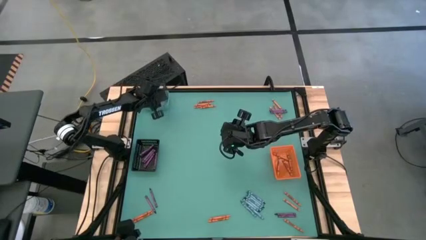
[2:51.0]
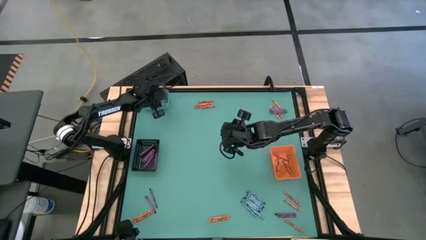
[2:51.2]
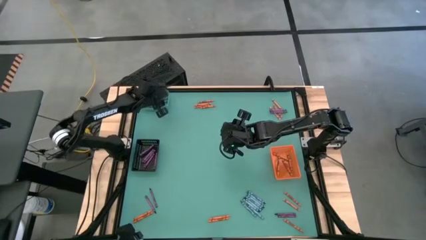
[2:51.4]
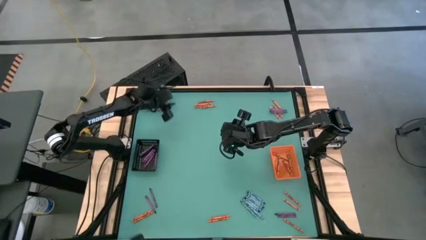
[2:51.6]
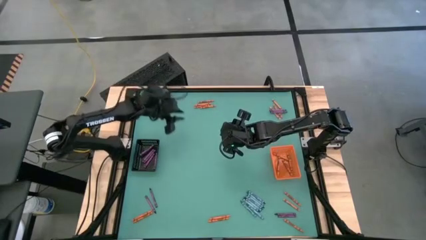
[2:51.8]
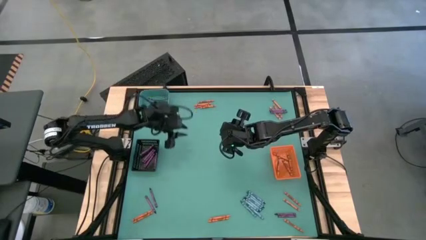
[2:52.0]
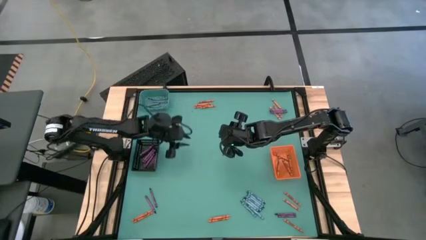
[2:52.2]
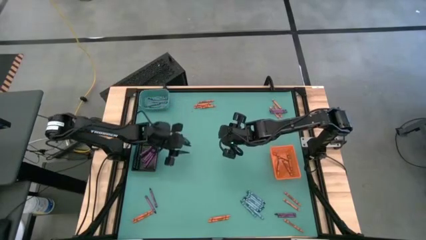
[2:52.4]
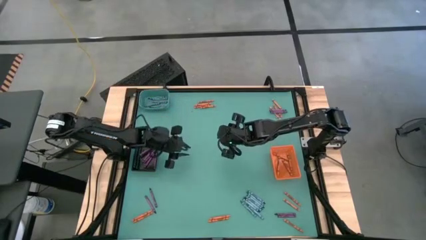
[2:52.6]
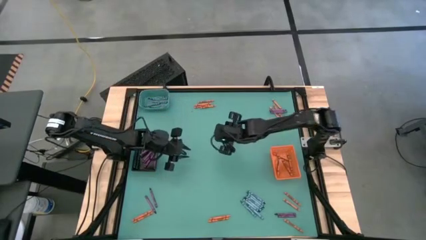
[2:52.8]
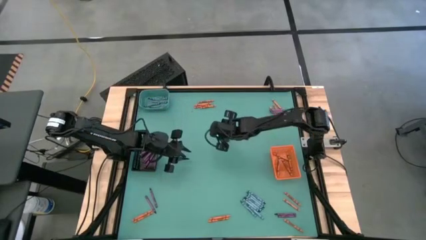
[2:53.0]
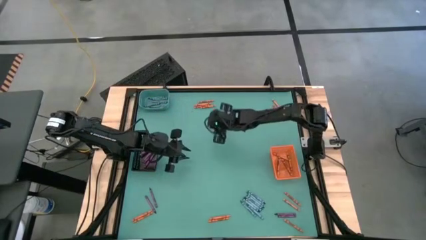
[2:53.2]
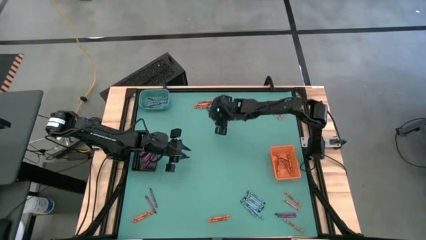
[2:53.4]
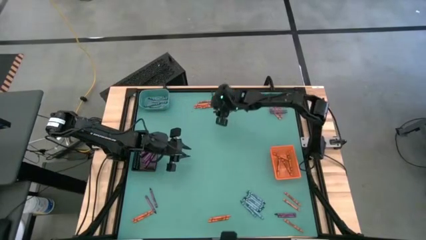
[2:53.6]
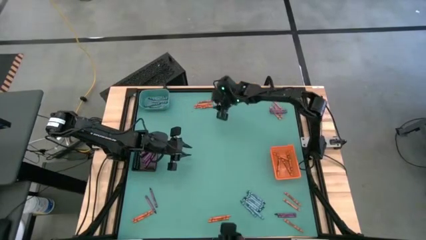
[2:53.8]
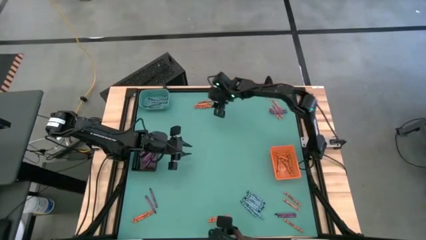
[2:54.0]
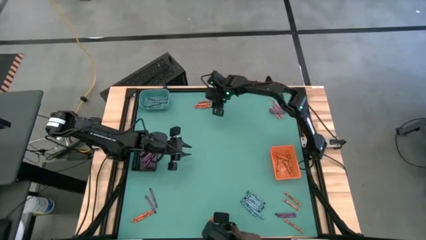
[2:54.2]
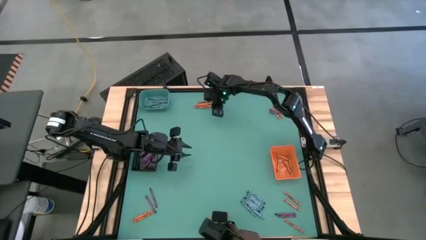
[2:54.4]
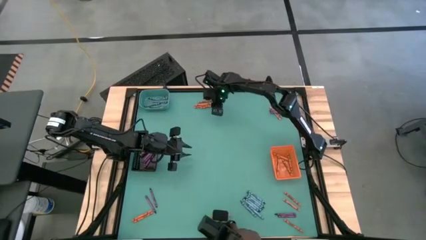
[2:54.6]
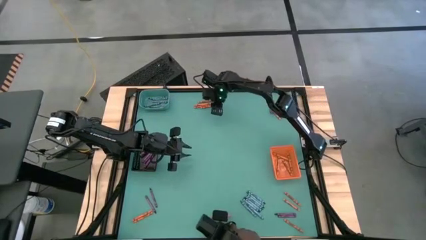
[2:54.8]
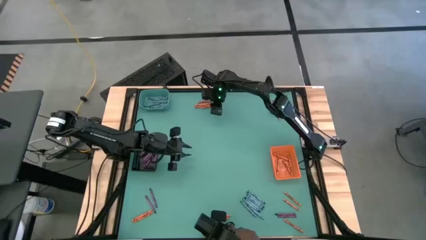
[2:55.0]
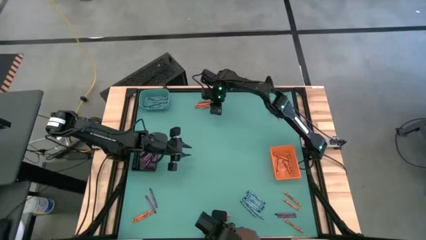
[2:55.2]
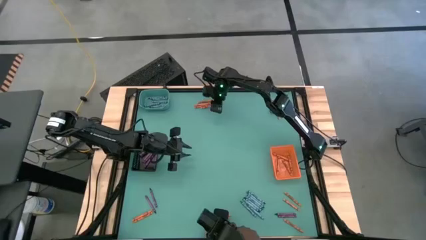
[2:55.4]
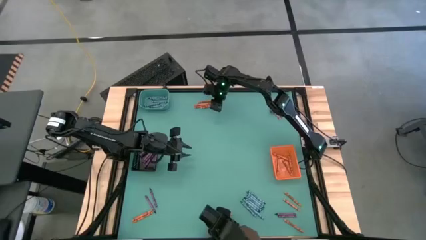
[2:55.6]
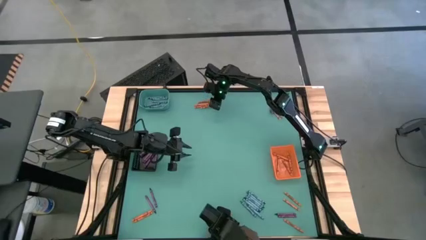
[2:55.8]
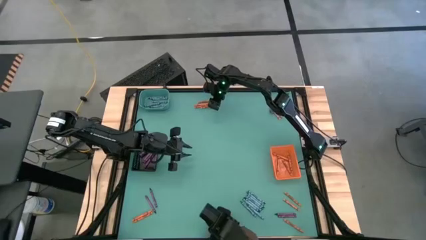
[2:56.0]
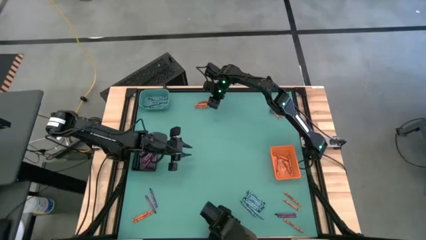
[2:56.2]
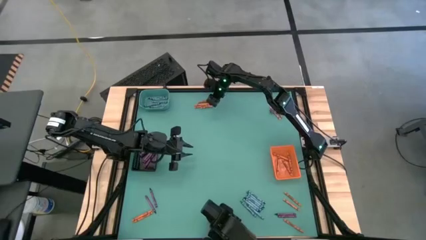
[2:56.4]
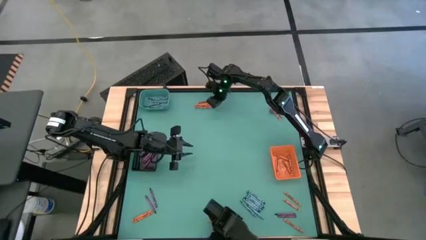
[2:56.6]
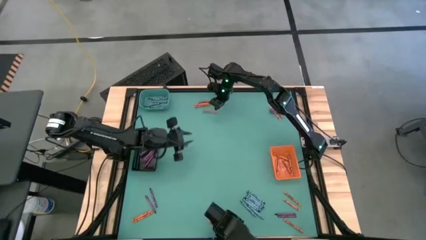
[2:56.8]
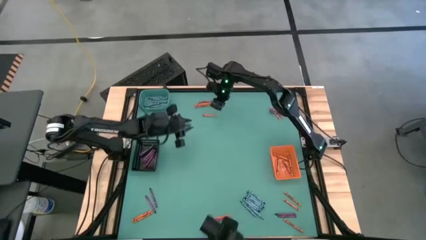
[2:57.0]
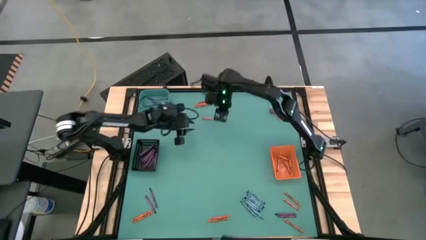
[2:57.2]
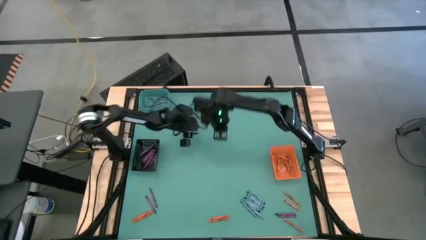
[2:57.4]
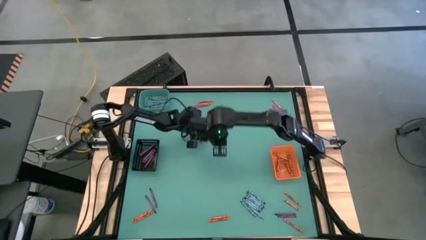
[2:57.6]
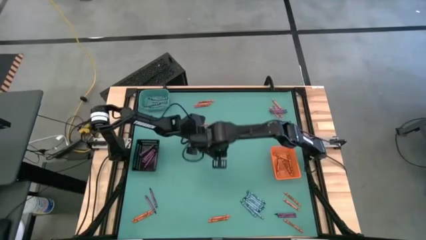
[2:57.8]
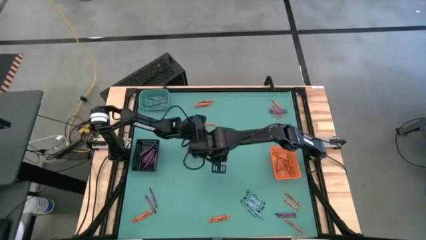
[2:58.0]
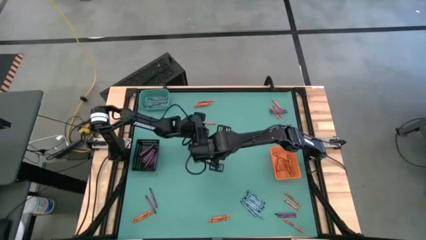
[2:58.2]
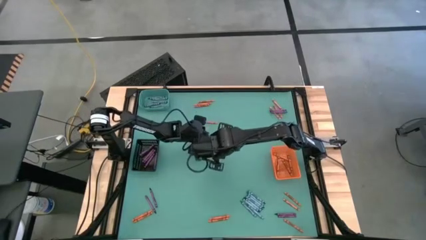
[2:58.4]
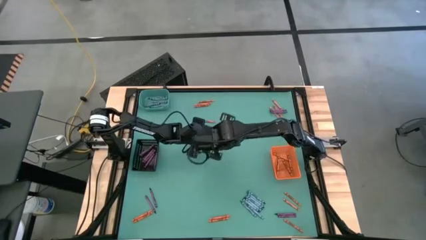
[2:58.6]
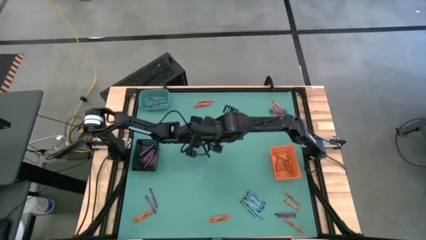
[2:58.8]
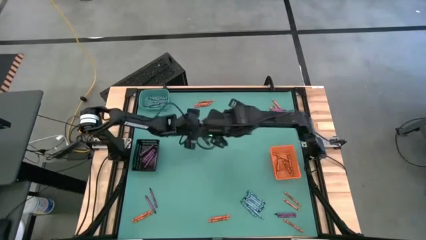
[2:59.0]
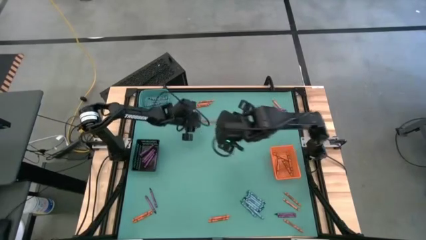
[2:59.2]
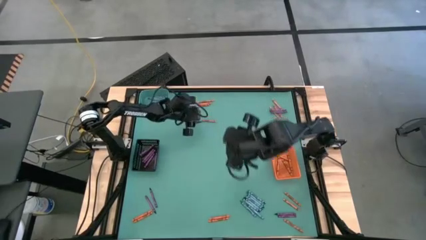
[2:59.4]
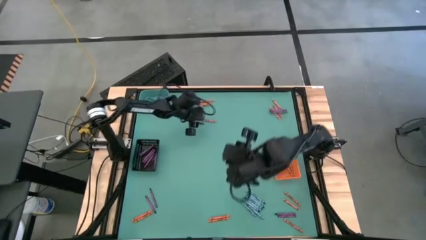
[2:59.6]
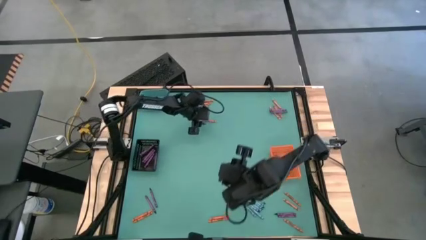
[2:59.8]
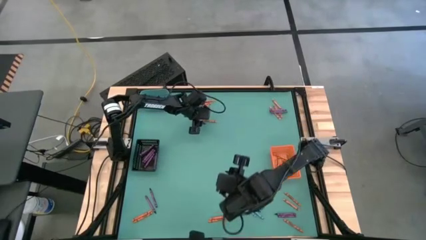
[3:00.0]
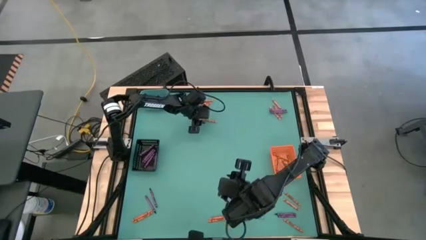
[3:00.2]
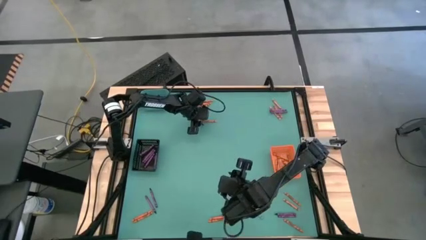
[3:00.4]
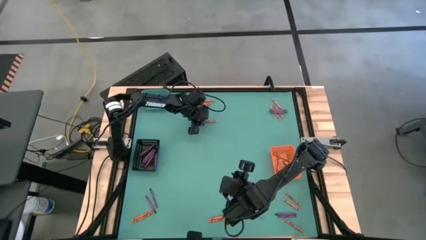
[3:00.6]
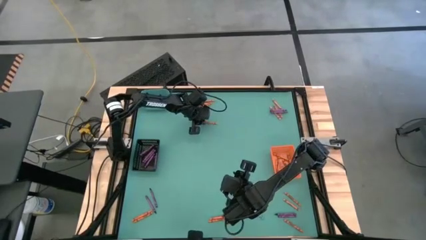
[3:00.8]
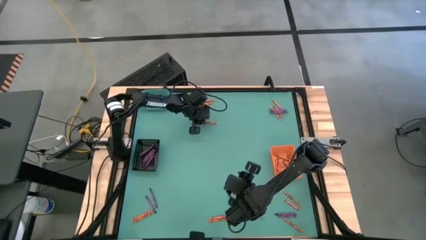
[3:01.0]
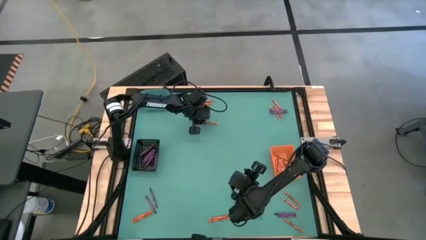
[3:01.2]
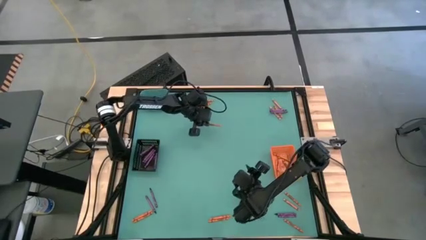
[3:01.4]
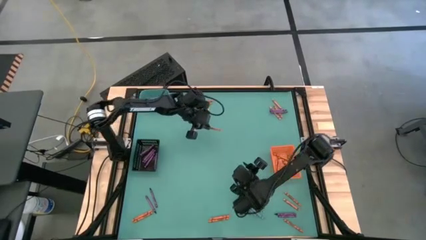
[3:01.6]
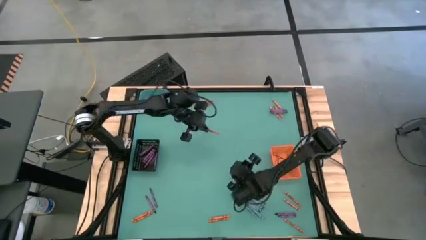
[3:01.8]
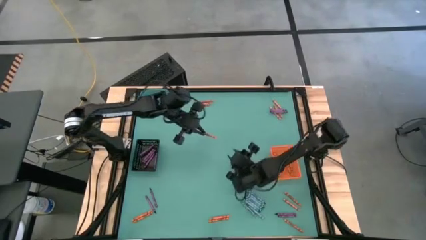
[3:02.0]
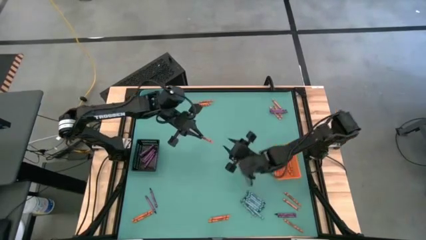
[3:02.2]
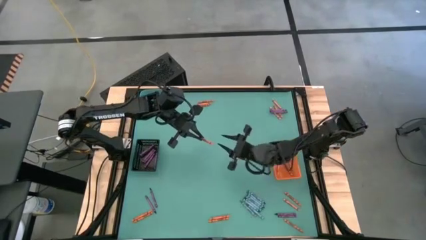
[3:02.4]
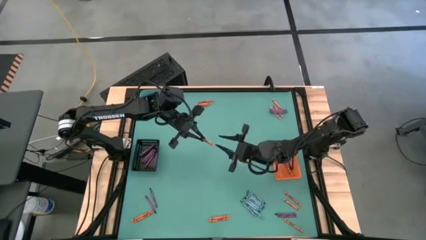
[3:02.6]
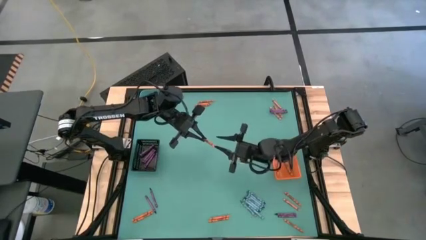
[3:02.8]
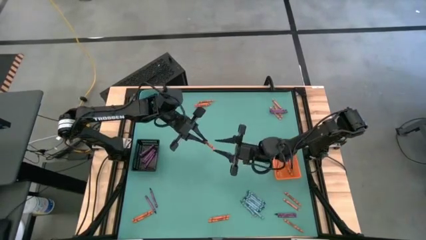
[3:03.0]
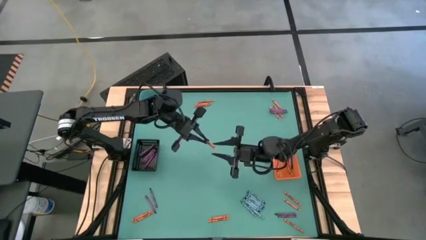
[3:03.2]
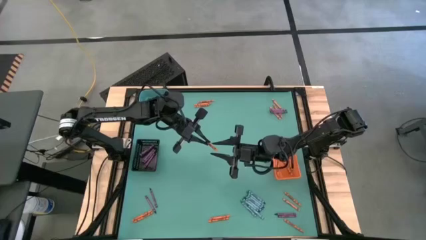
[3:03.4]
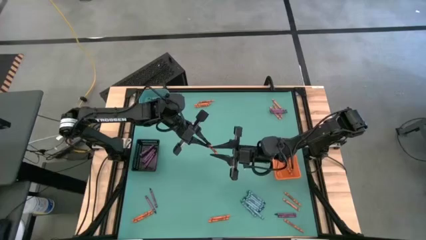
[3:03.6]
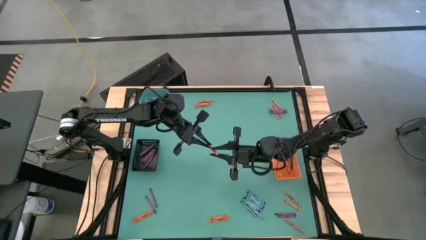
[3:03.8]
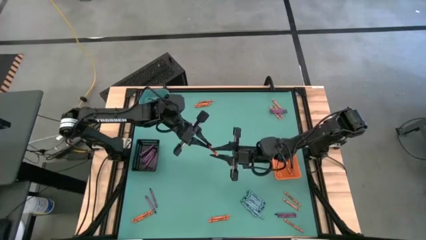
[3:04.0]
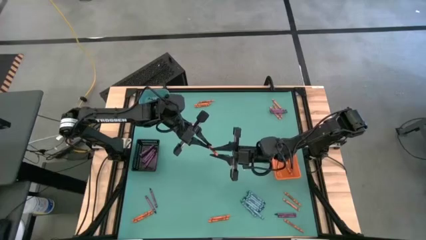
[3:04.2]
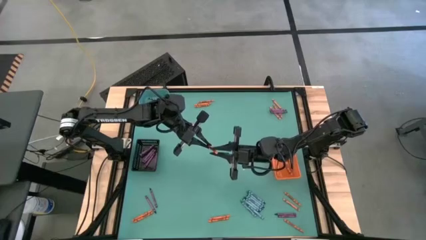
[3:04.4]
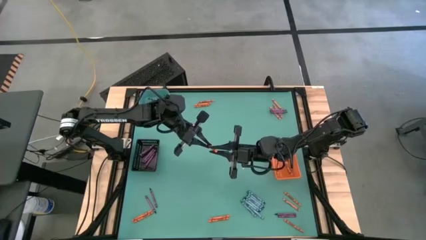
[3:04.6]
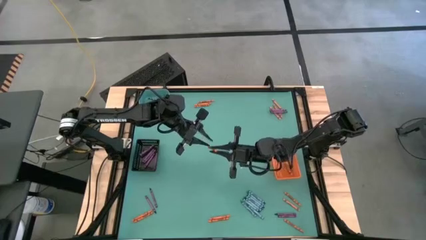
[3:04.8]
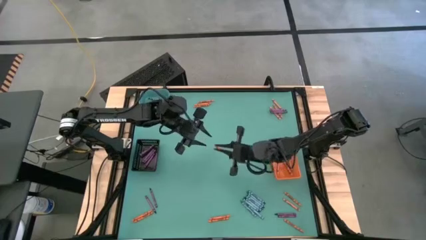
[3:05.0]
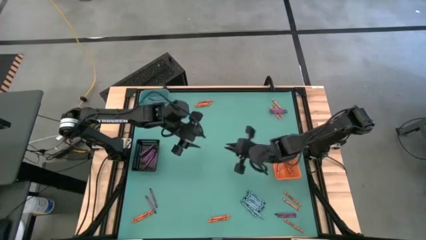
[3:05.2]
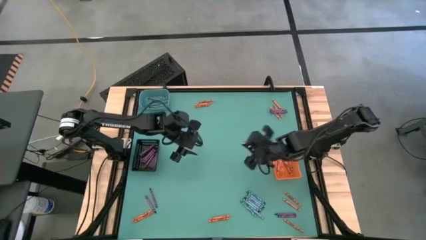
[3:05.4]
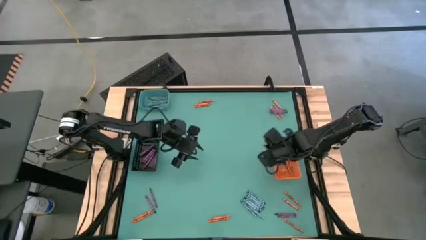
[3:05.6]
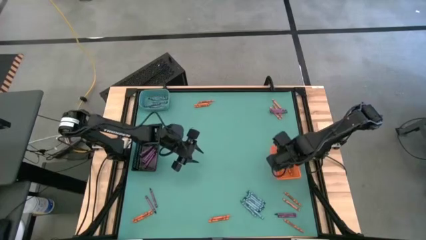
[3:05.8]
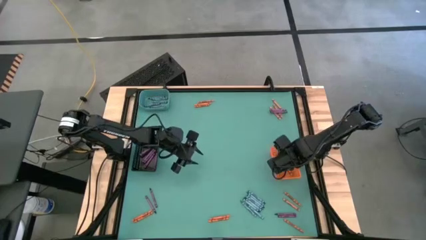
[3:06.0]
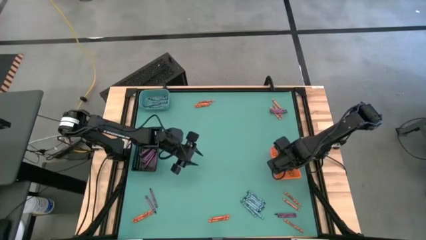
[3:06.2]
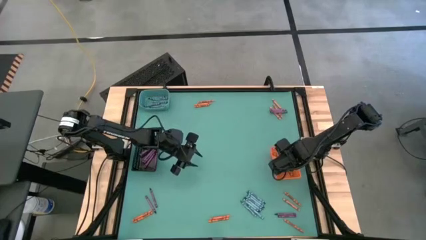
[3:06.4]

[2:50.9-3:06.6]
Task: Sort crayons
Put the orange crayon into the orange bin
